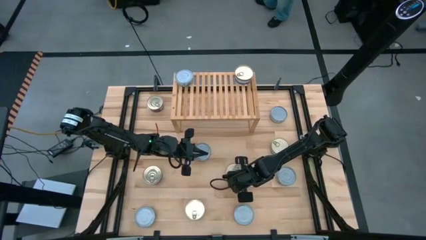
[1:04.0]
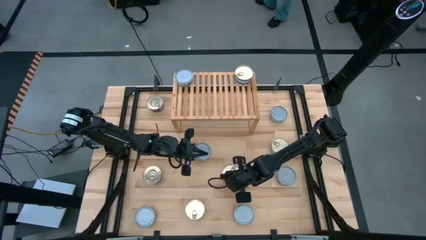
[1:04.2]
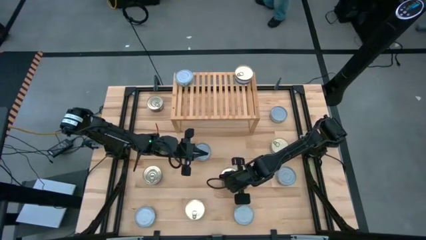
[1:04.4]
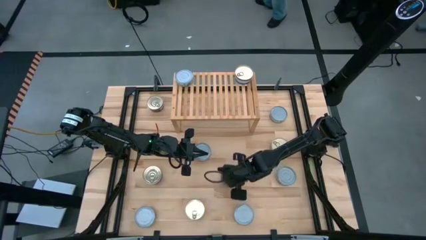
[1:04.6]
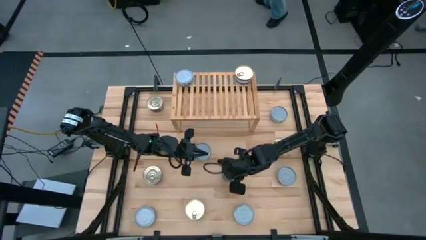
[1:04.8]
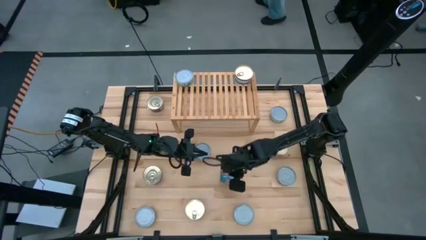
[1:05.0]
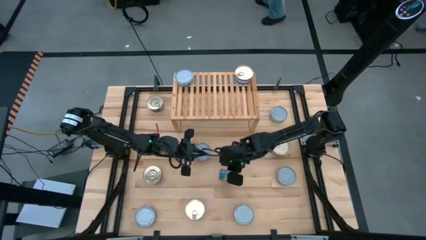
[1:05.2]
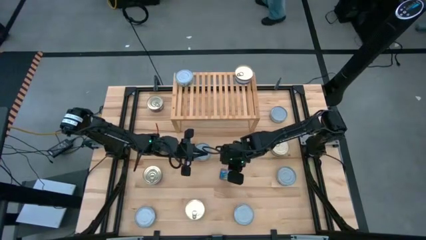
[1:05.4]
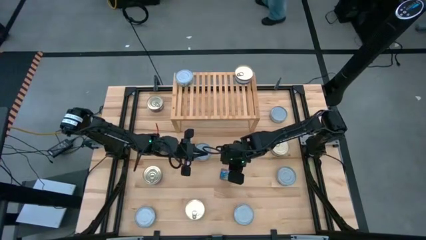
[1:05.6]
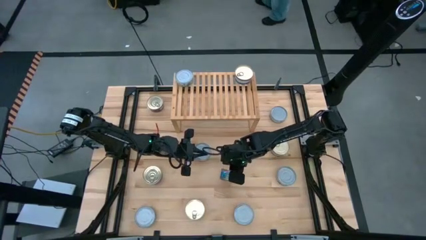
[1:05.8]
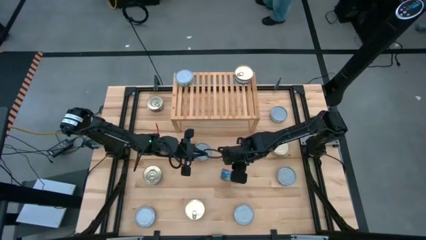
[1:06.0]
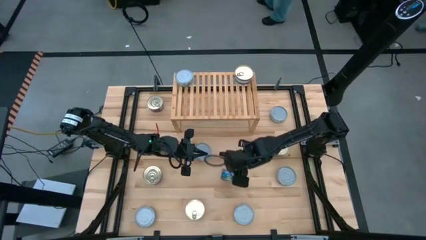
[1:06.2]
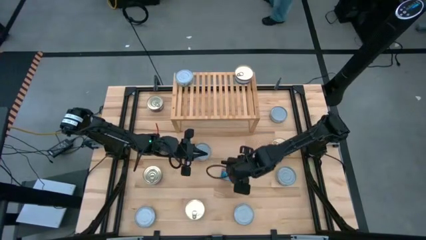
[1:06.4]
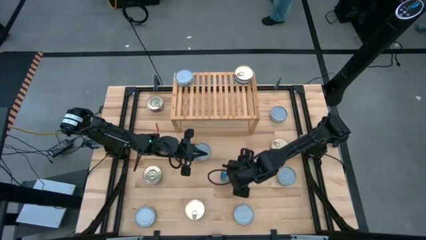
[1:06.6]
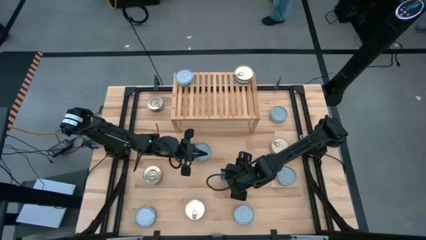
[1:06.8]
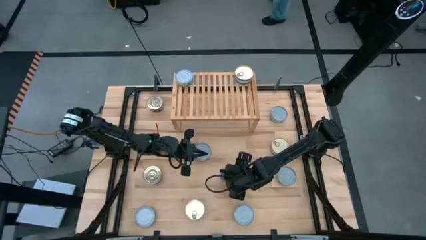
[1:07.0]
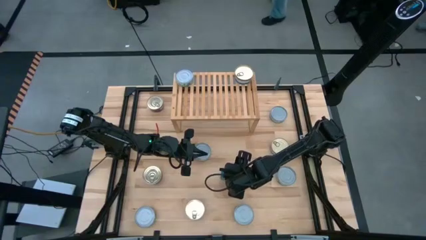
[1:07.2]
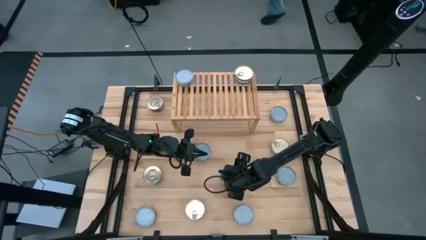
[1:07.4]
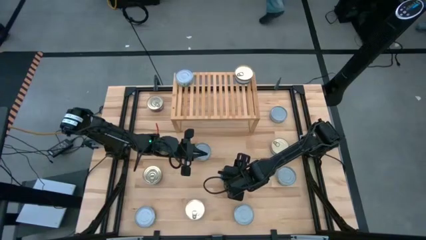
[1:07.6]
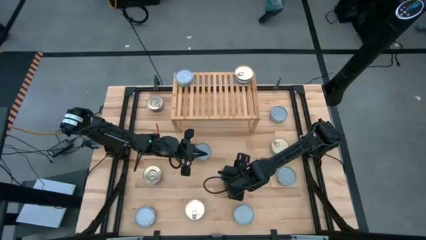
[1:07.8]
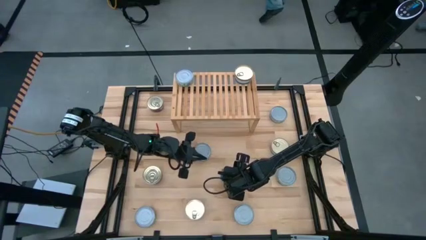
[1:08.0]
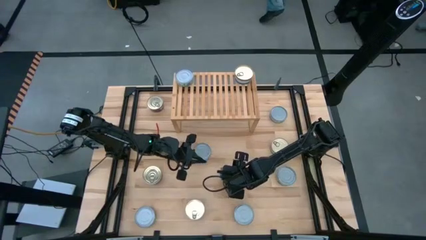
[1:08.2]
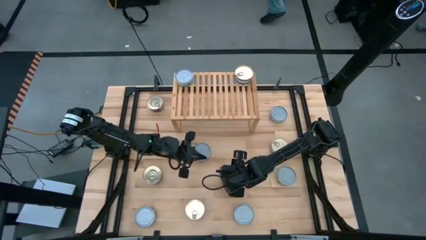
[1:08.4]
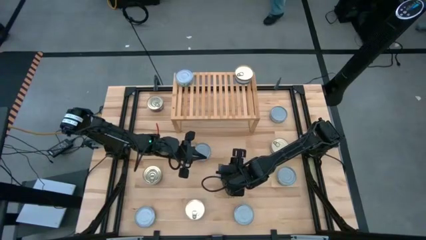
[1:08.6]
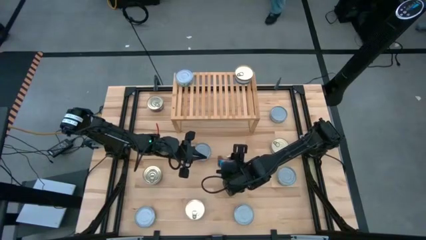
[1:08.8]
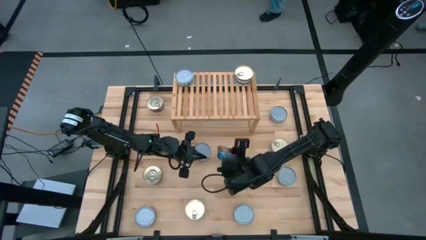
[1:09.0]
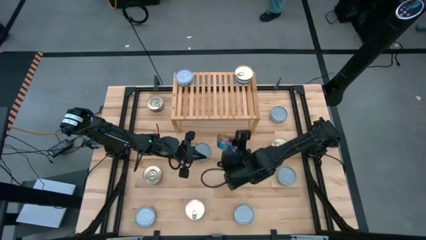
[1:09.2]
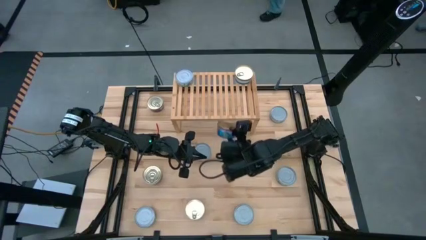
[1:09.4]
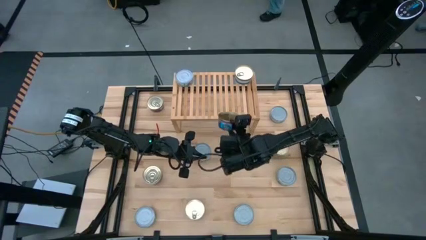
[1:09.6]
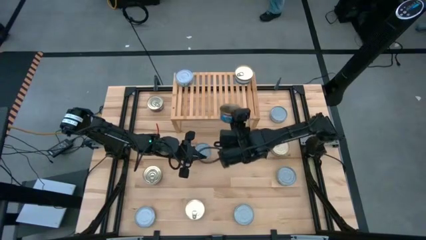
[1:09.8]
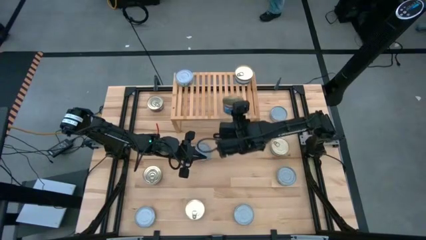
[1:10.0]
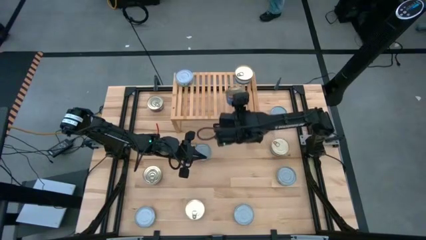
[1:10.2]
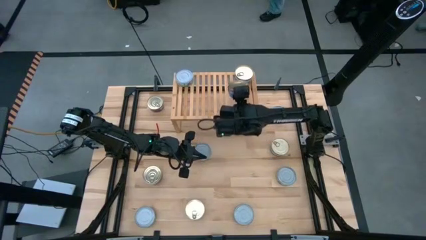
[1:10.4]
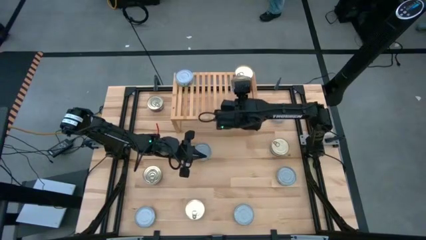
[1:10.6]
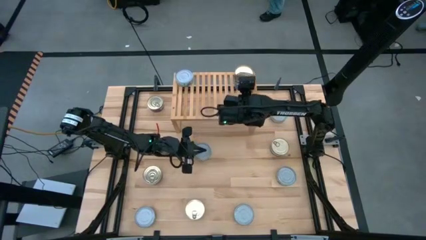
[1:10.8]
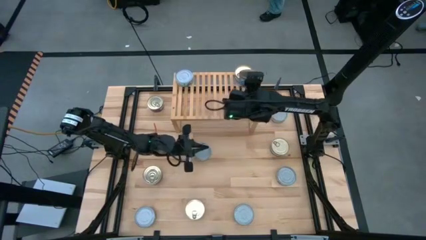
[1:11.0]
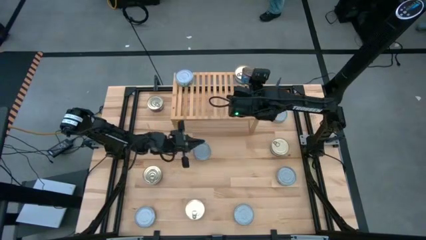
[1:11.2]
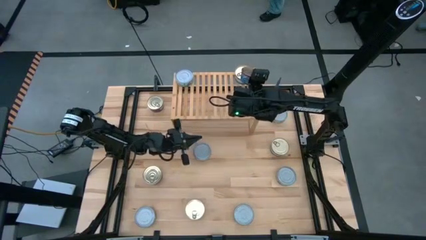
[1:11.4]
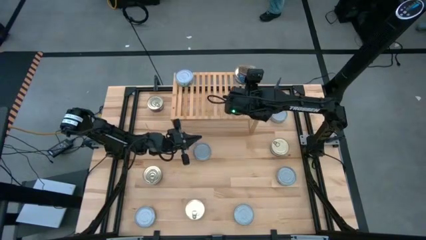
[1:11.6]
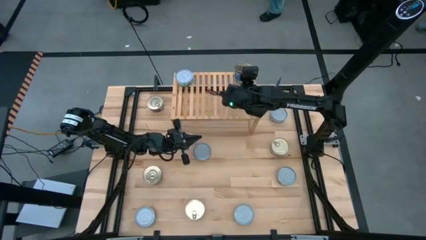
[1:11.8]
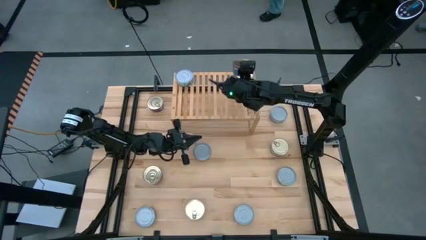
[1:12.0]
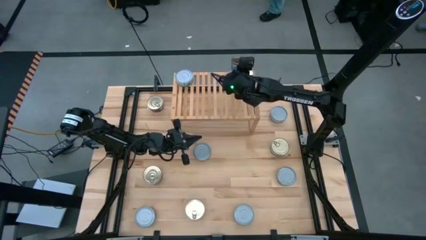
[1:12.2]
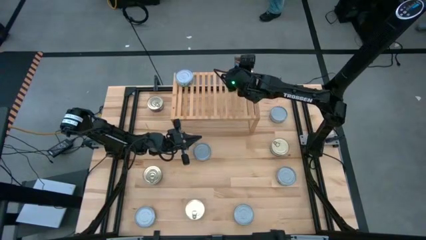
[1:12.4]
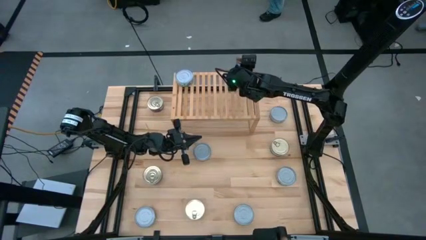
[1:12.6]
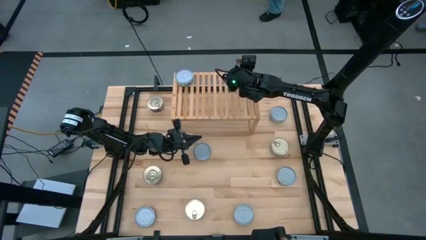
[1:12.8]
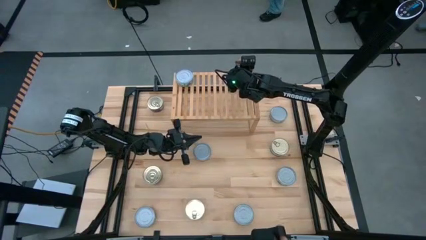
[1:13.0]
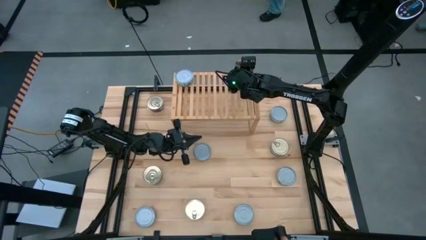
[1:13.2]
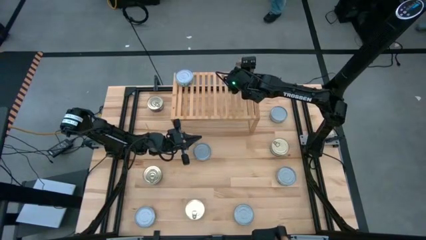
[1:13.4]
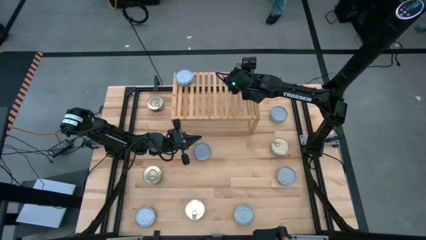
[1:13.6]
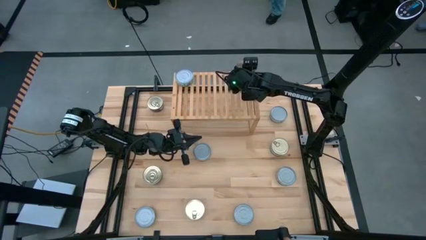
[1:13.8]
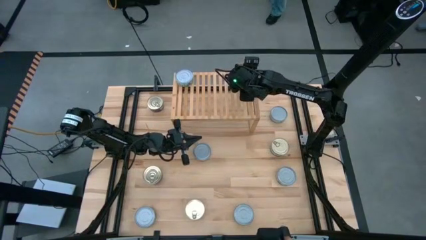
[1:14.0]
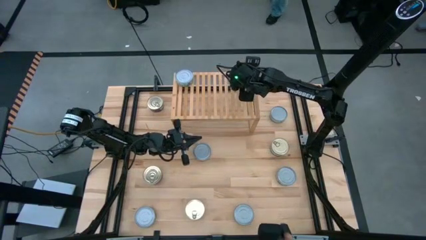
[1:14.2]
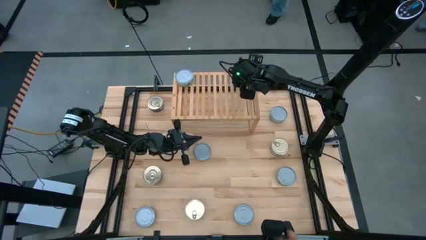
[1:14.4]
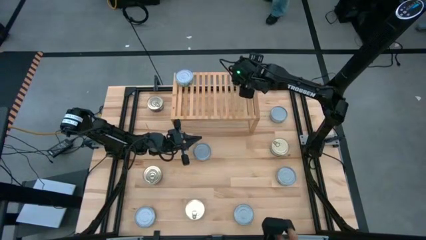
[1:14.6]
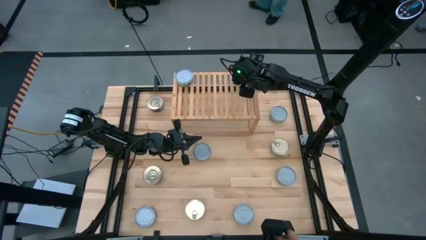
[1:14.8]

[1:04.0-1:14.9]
Task: Stack canned seafood by type on shelf
Stack the blue tuna can on top of the other blue tuna can on the shelf

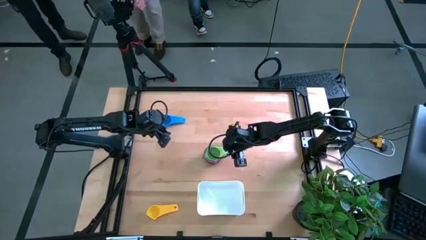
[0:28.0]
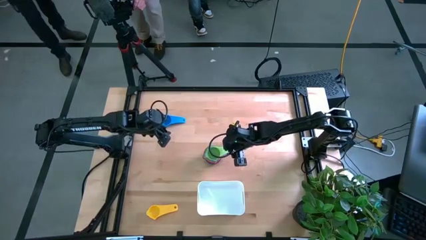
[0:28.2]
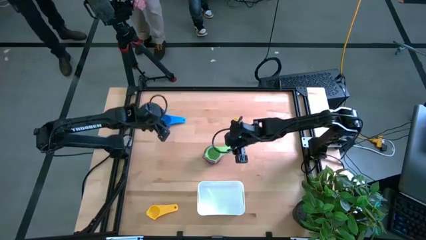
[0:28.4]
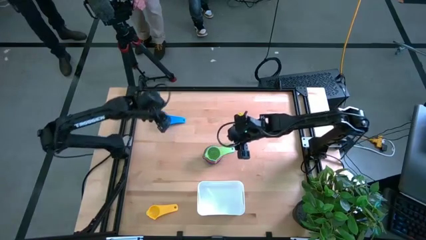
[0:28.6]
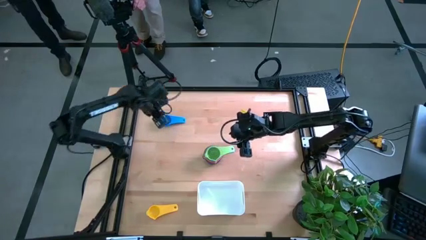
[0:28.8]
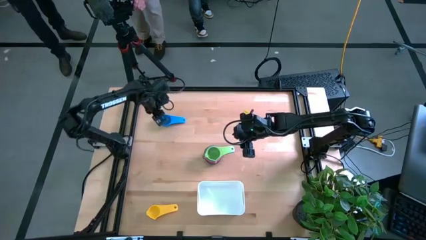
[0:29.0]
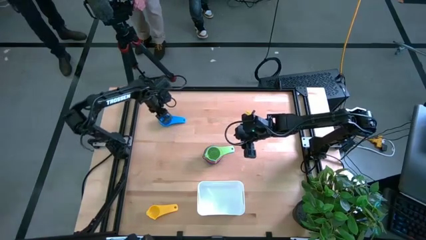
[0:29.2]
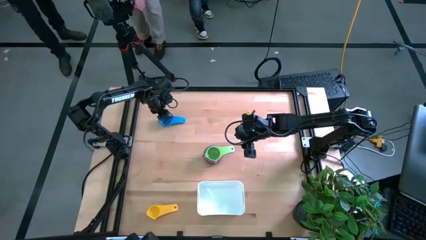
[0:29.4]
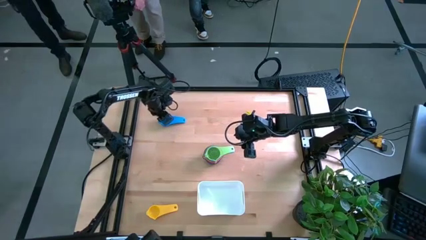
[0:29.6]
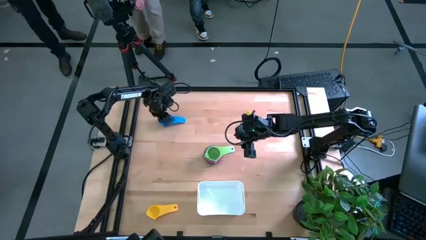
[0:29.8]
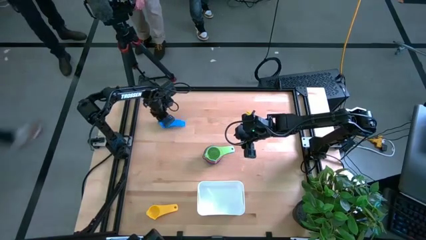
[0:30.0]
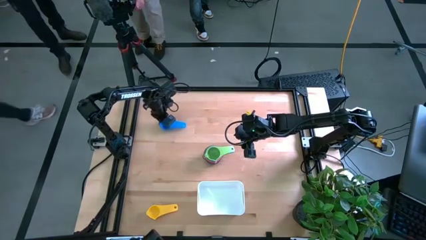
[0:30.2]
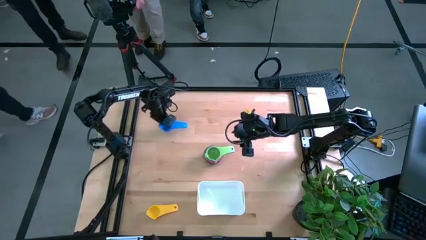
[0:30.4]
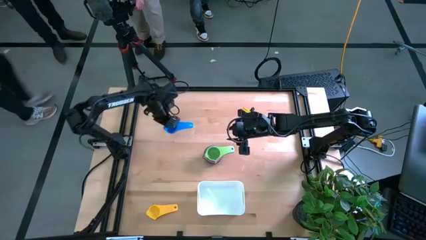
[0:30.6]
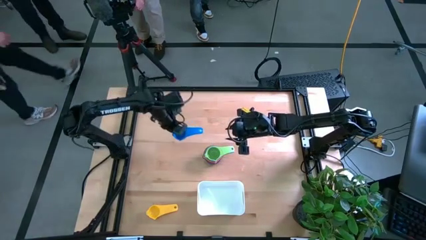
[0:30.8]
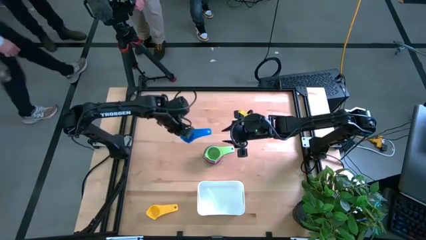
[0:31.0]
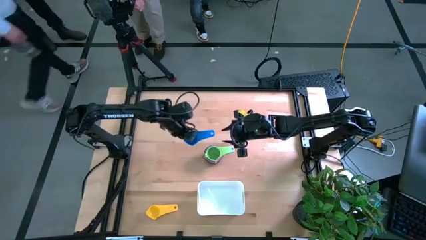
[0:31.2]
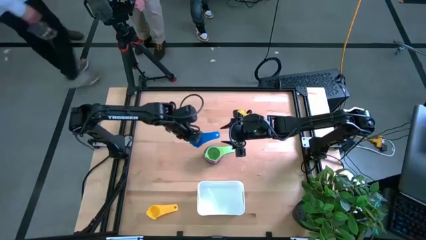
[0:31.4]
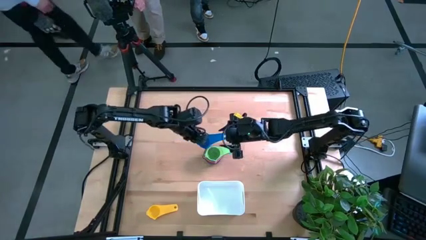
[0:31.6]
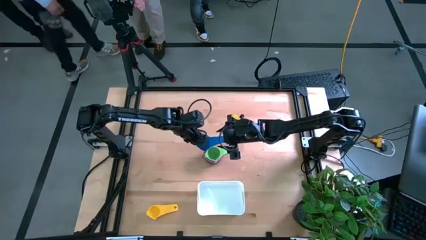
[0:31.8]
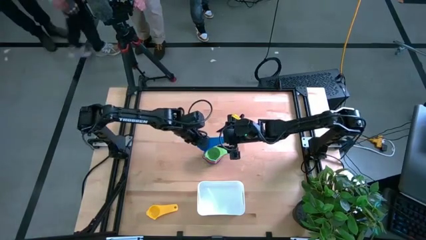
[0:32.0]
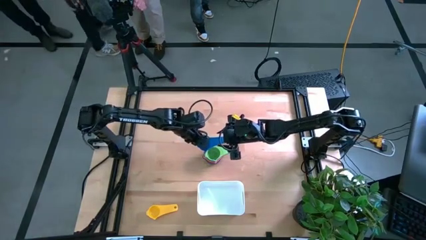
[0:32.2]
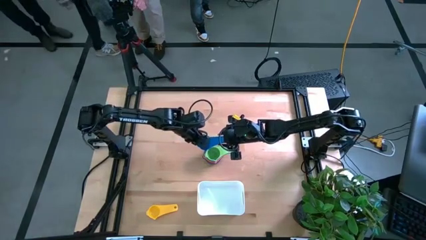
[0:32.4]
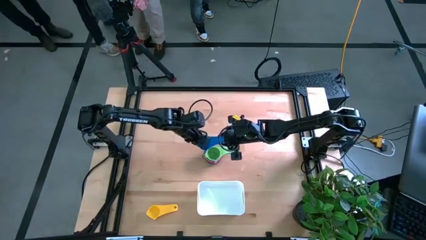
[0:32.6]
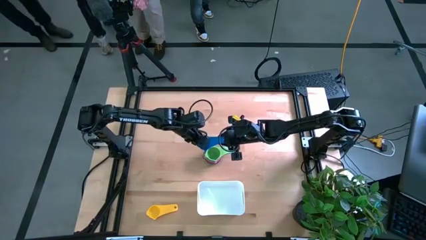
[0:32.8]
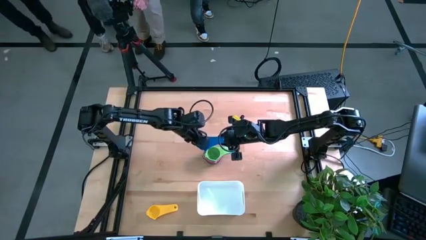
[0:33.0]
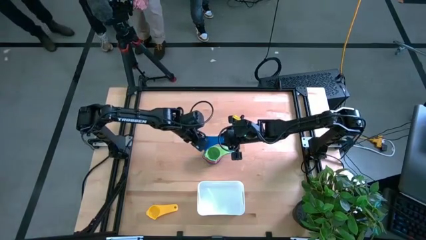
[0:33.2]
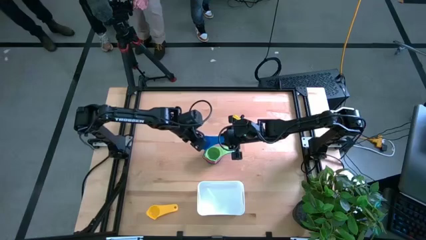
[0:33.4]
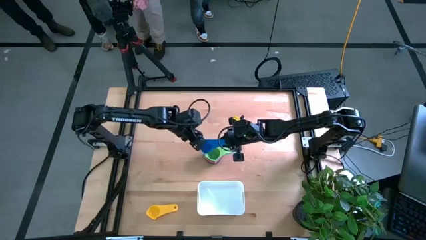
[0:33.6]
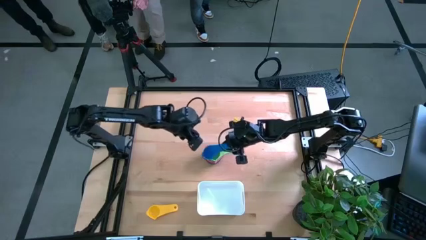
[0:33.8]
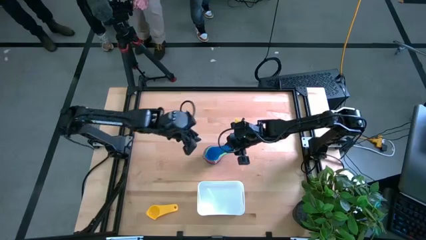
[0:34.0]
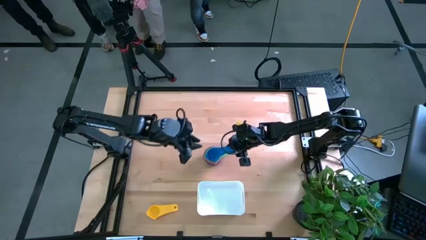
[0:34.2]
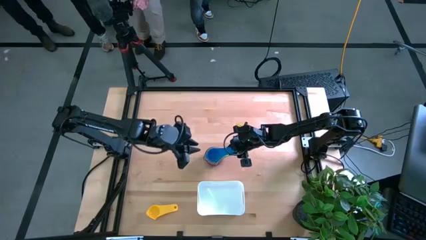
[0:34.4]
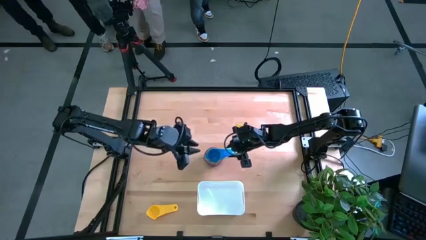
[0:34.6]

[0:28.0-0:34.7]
Task: Nest measuring cups in basket
Stack the blue measuring cup on the green measuring cup
